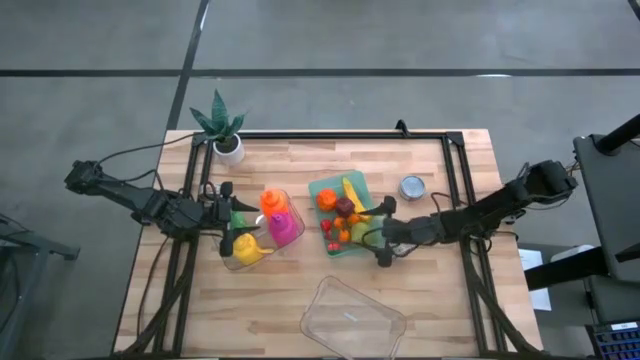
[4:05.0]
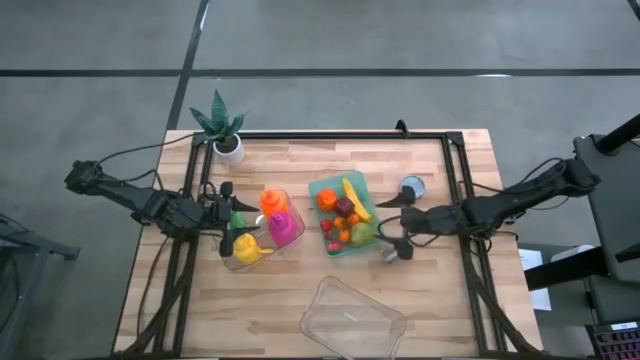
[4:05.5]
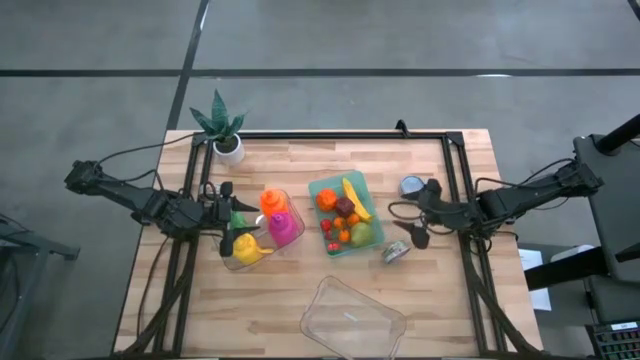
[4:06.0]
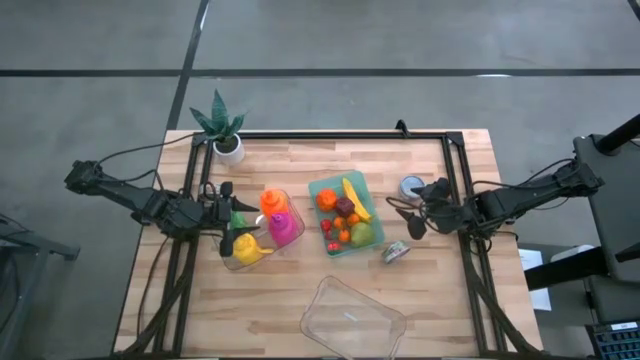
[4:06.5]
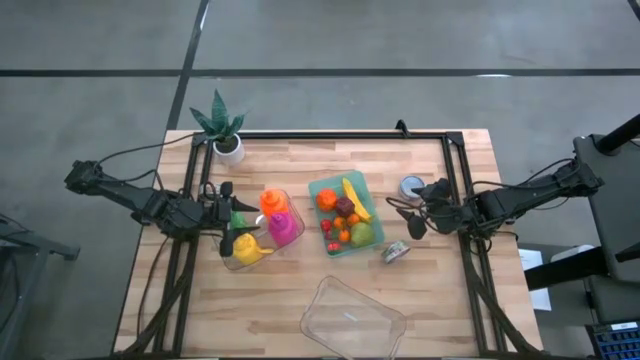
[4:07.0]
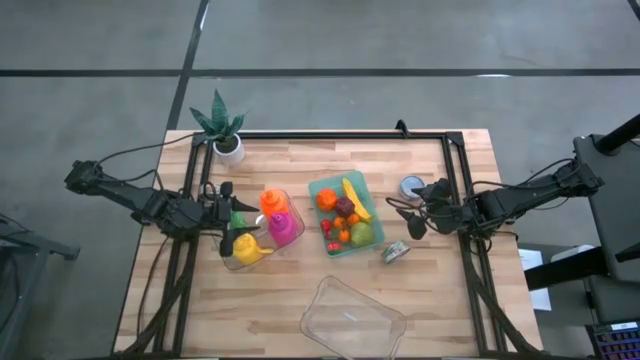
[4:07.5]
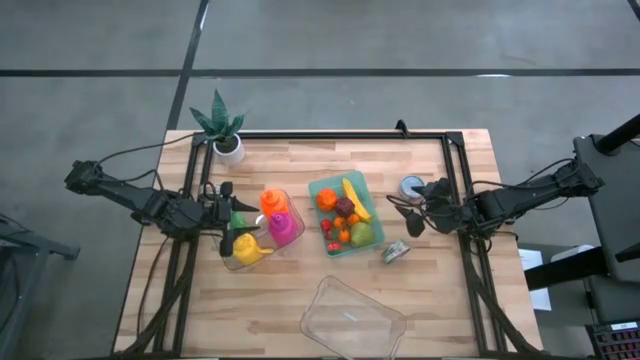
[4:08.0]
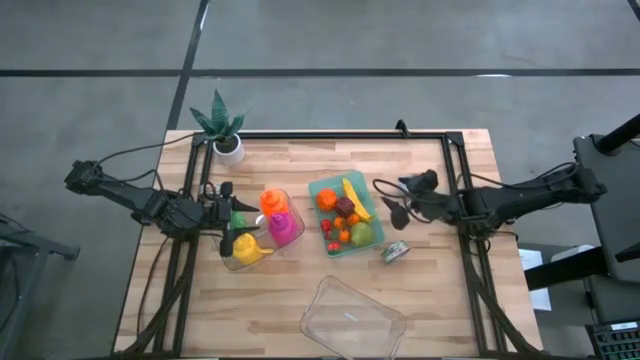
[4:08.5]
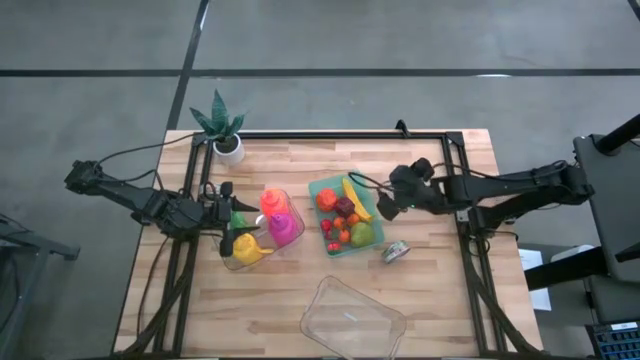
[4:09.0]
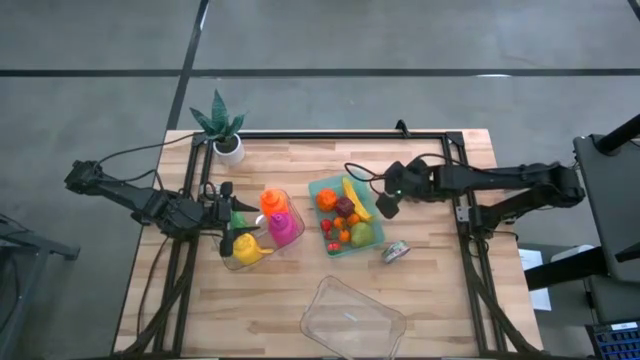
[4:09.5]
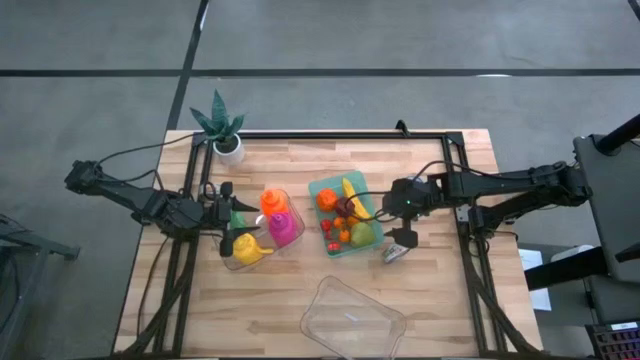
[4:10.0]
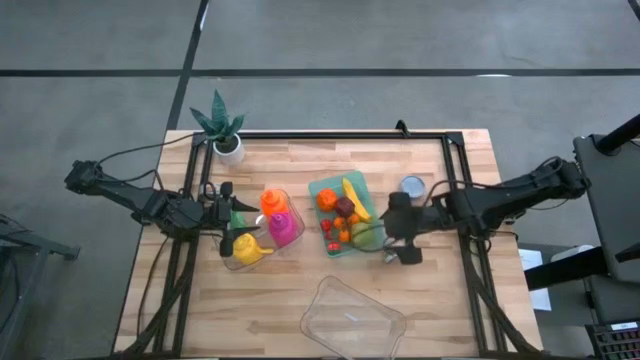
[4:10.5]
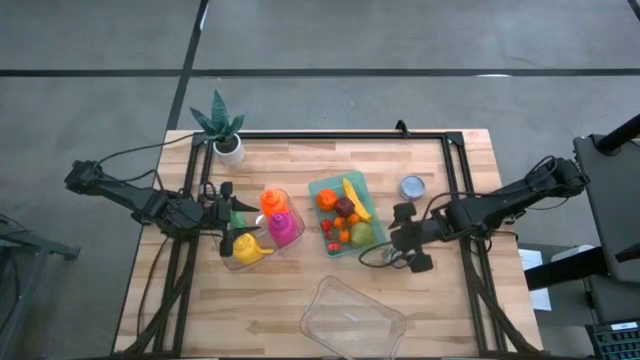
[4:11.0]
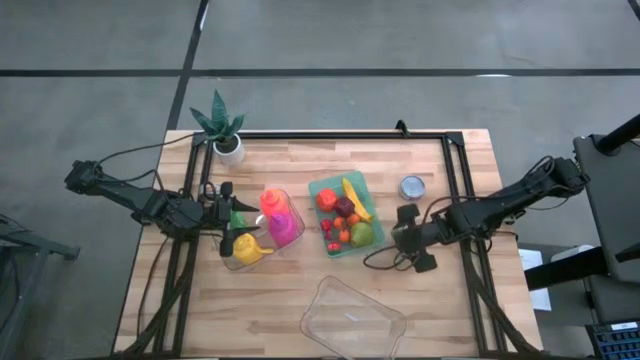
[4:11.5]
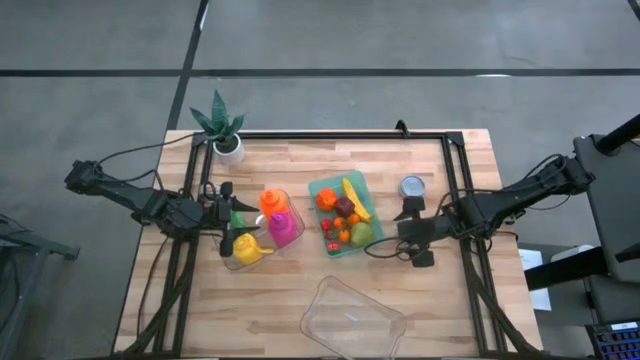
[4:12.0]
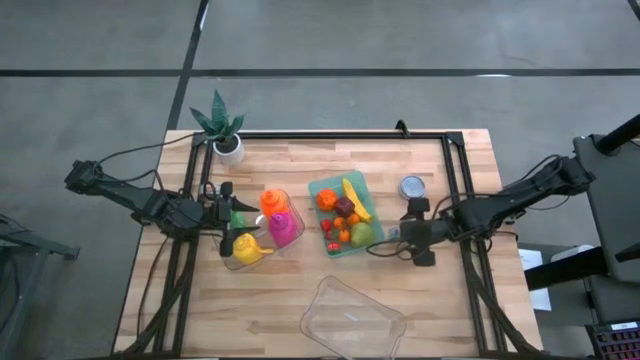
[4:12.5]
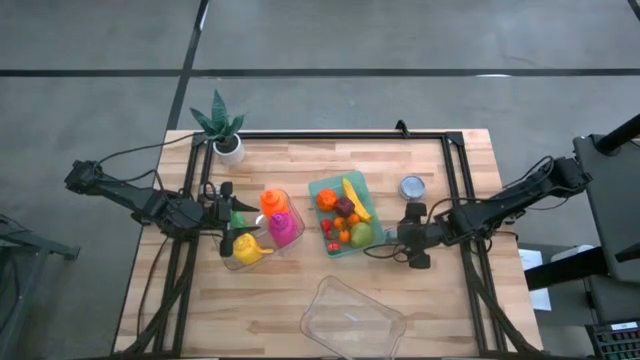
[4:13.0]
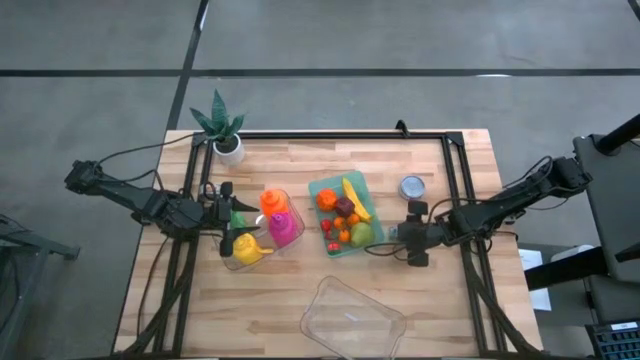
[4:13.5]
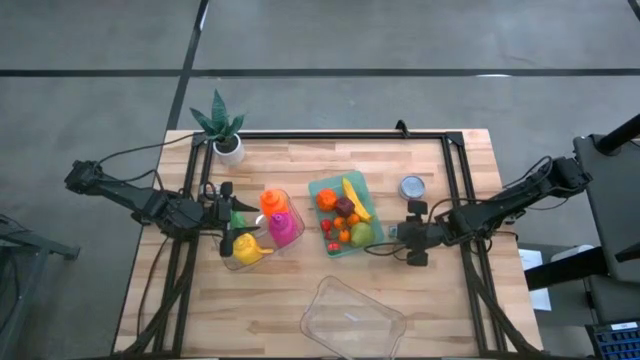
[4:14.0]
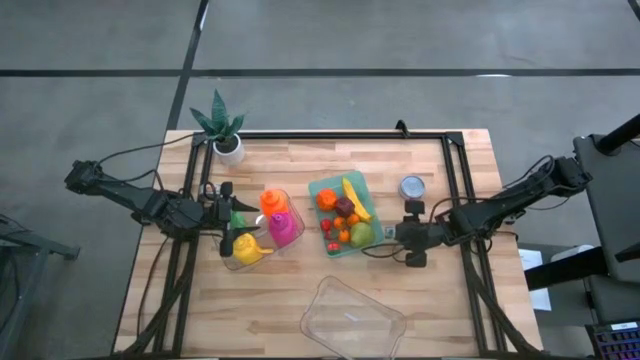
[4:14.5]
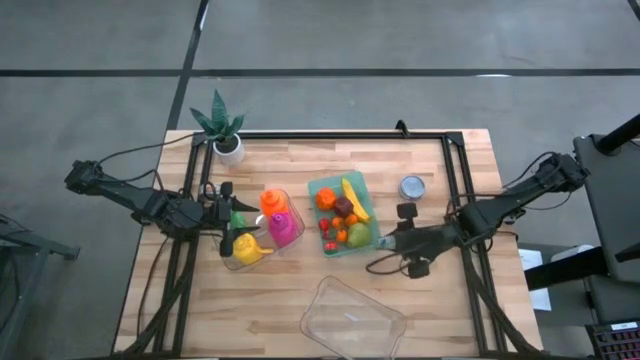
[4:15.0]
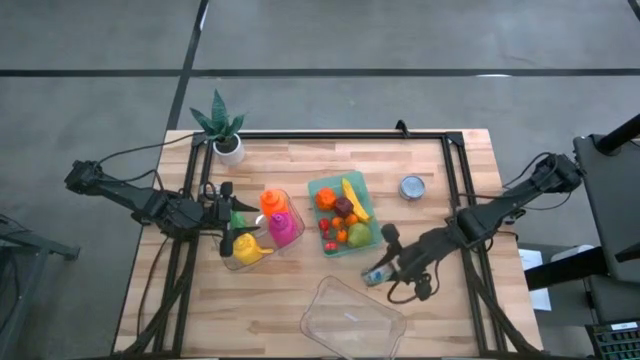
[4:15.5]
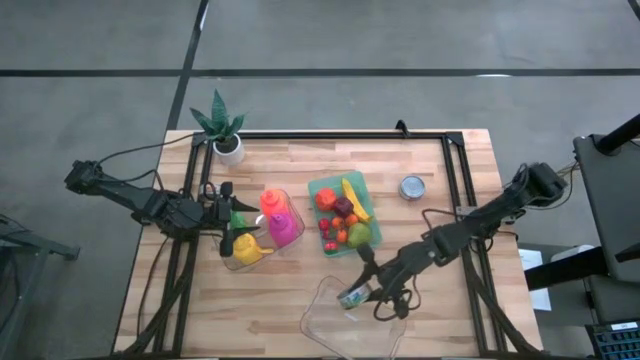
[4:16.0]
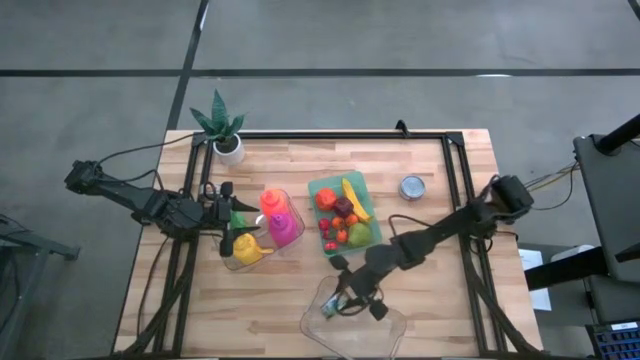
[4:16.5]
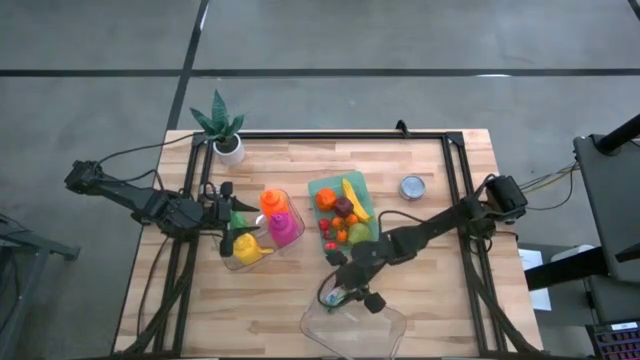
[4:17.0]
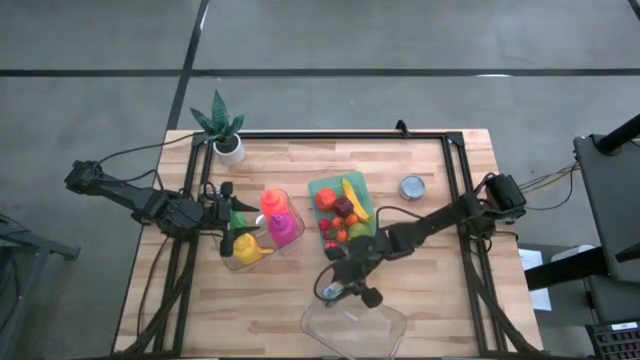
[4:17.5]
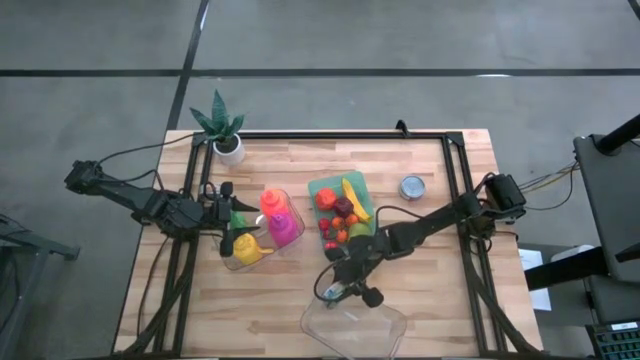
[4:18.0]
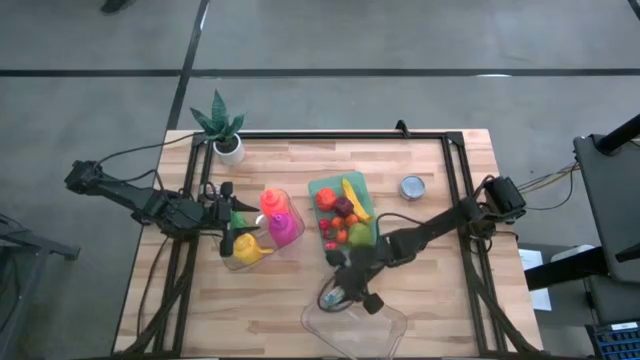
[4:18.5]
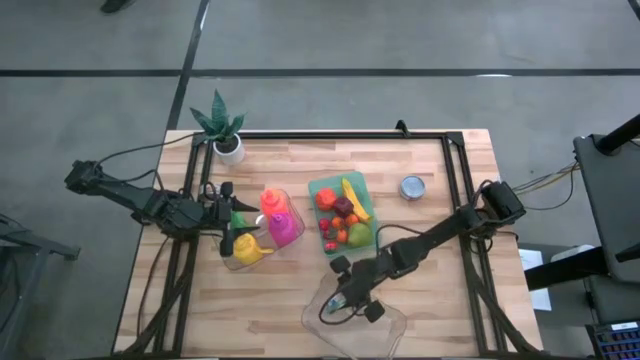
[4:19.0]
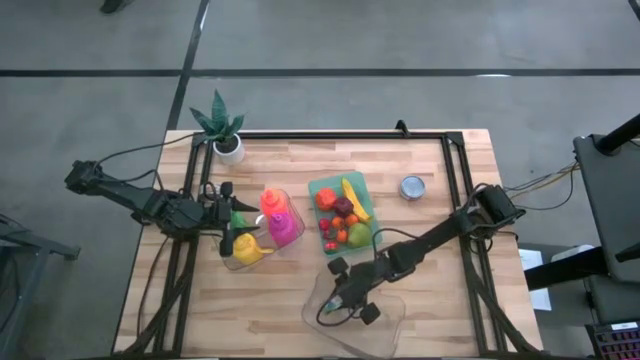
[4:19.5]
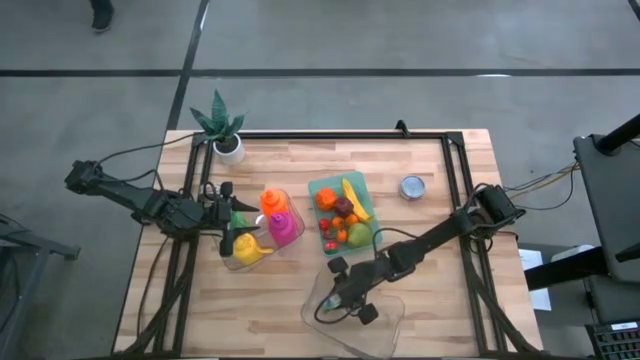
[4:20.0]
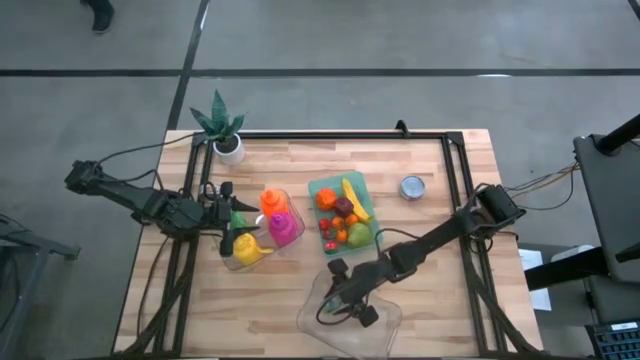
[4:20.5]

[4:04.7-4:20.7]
Task: Pick & Place Food Item
Put the green and white tuna can into the bottom transparent bin

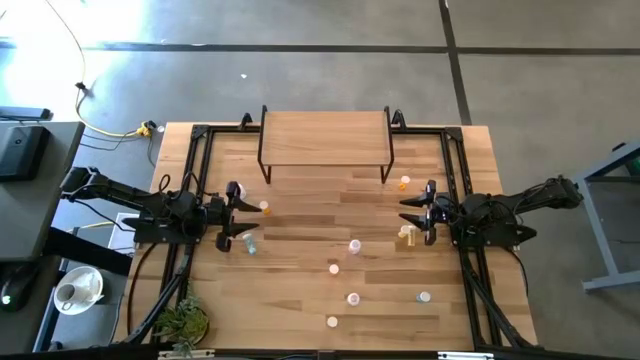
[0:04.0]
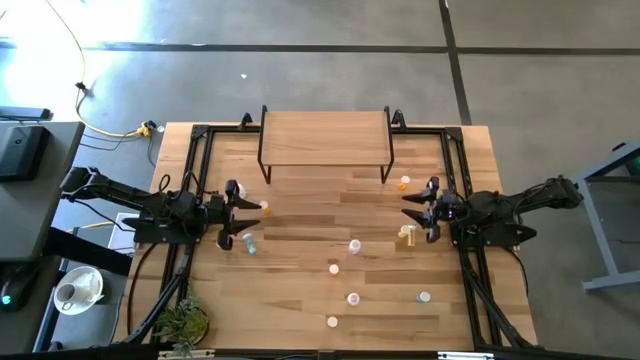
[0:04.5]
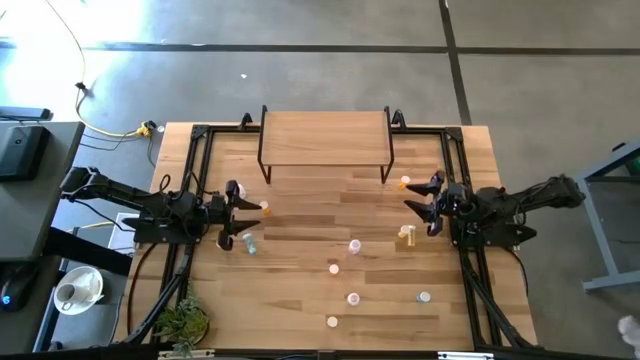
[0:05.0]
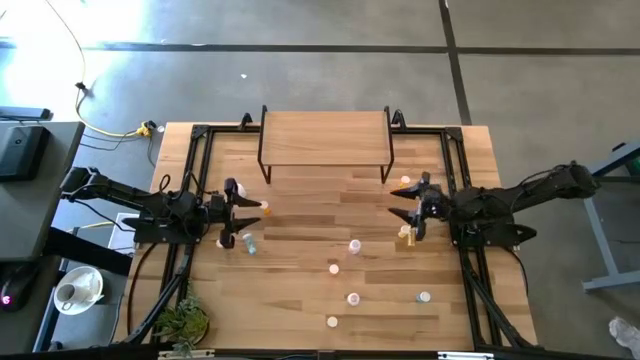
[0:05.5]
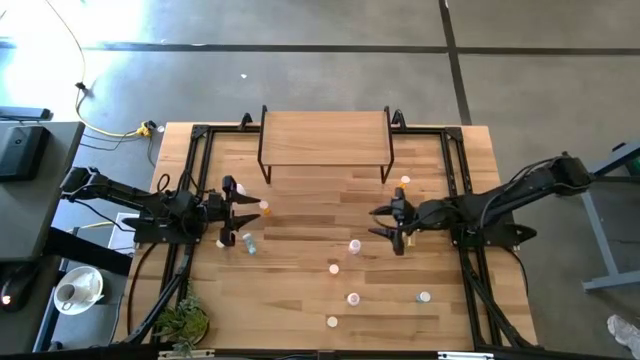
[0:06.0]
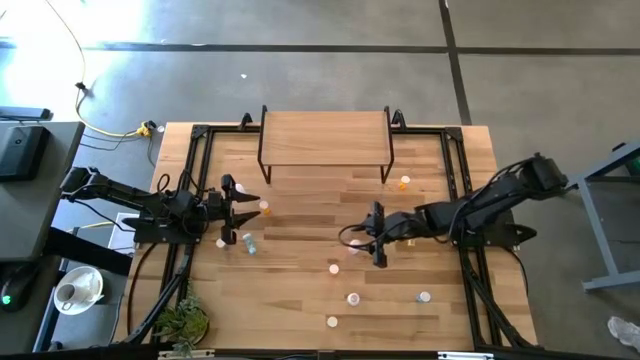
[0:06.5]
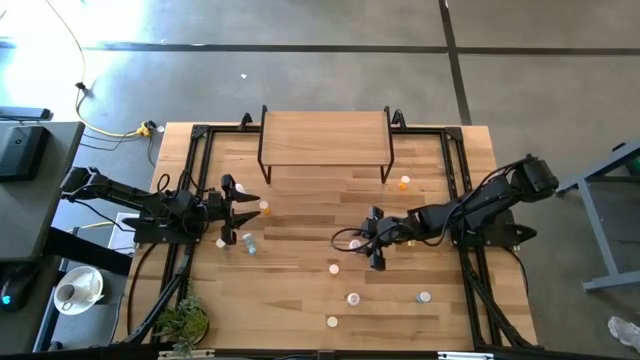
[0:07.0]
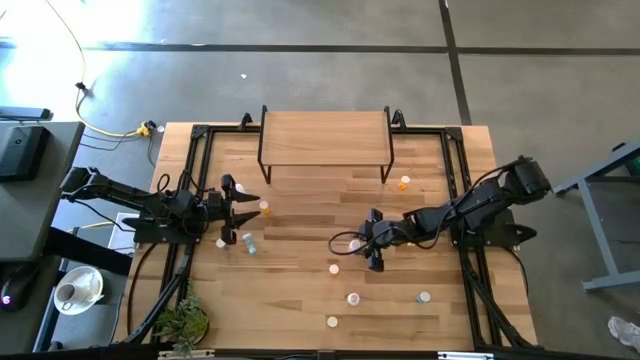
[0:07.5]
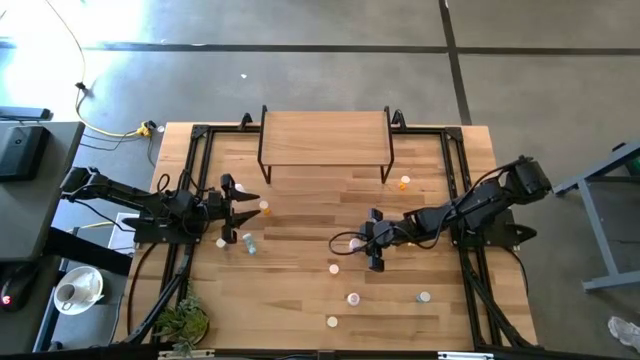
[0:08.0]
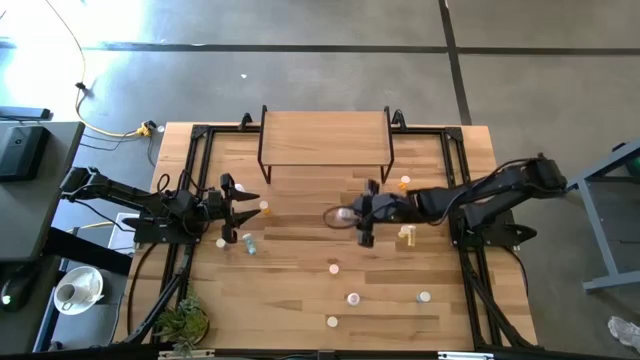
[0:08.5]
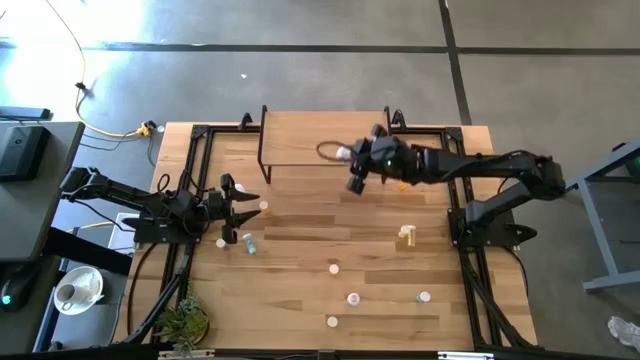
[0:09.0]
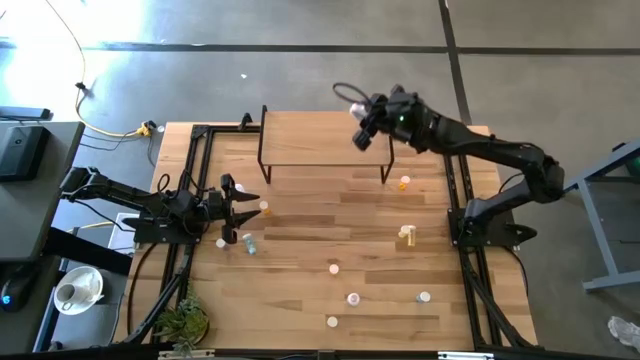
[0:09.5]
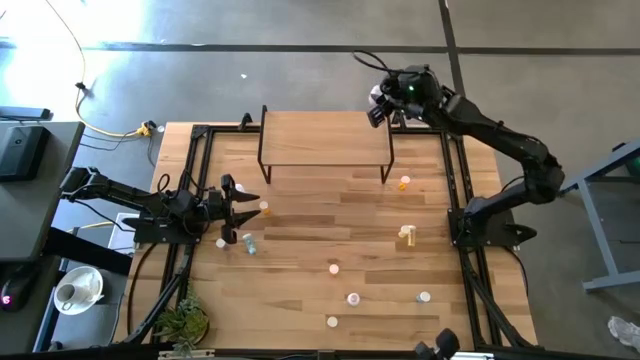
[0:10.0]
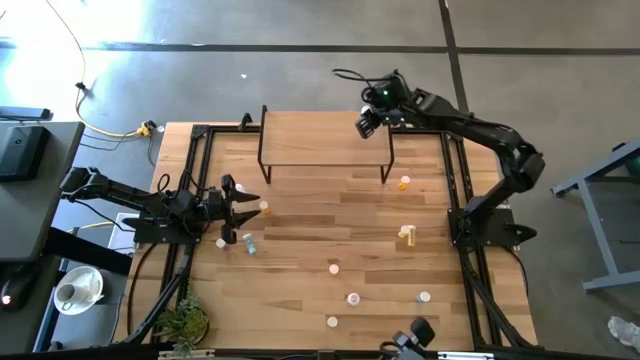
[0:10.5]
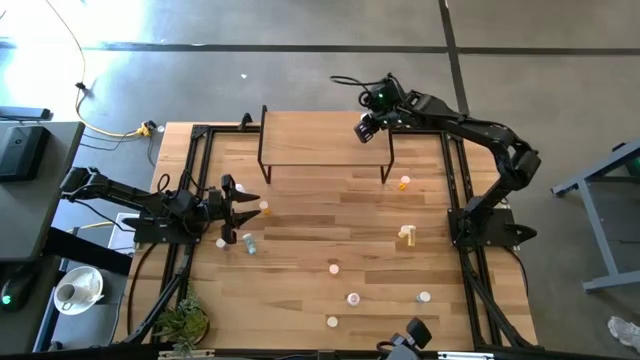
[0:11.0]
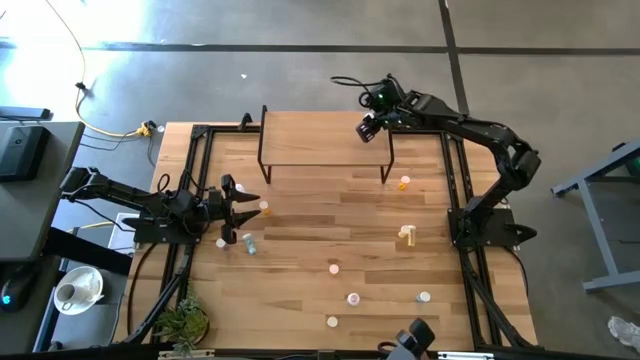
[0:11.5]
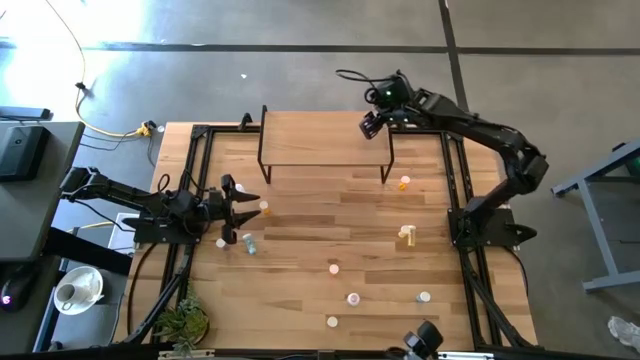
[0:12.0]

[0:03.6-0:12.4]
Task: Pick and place medicine bottles onto shelf by color
Put the middle white pill bottle on the shelf
